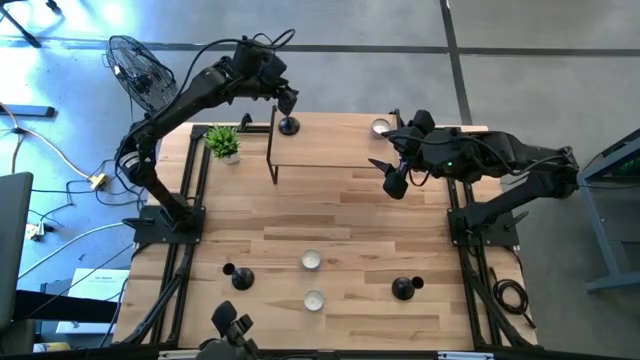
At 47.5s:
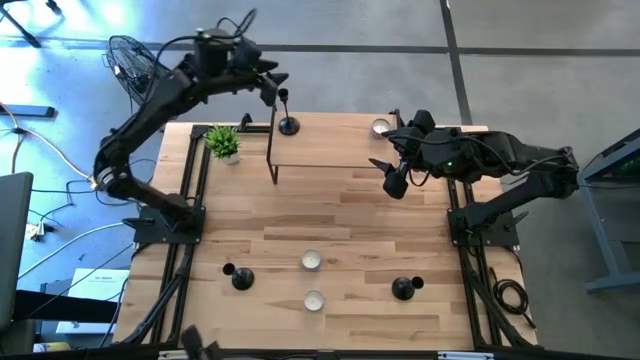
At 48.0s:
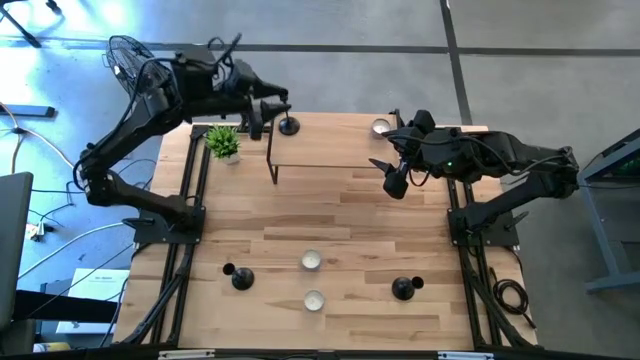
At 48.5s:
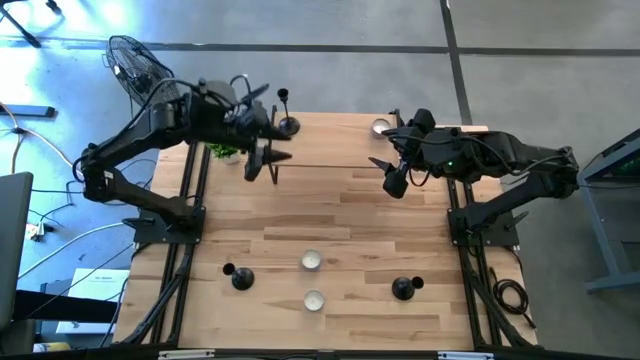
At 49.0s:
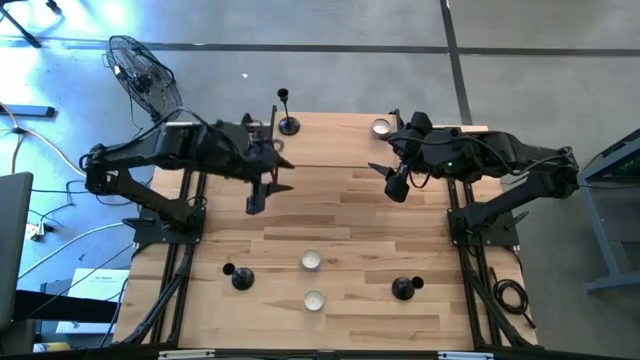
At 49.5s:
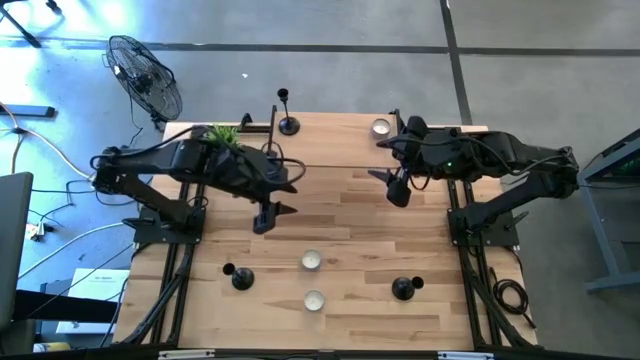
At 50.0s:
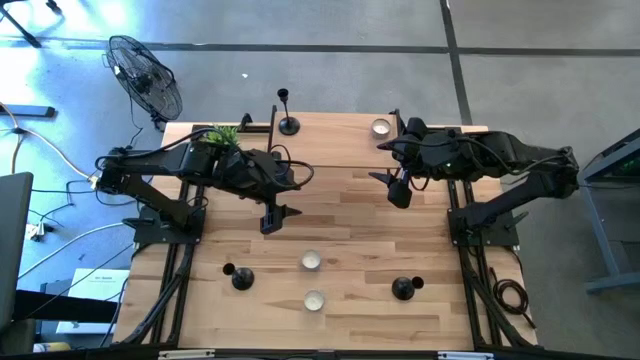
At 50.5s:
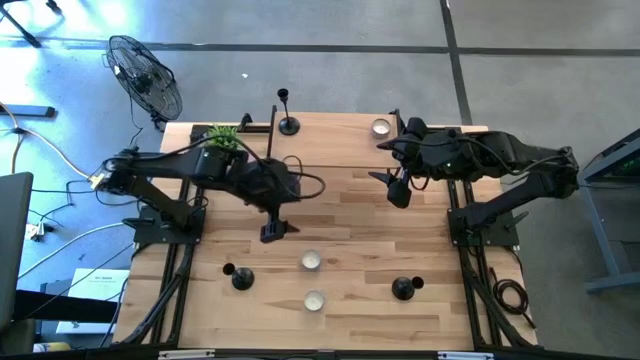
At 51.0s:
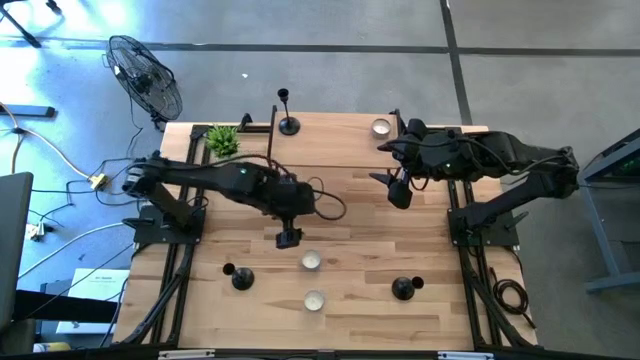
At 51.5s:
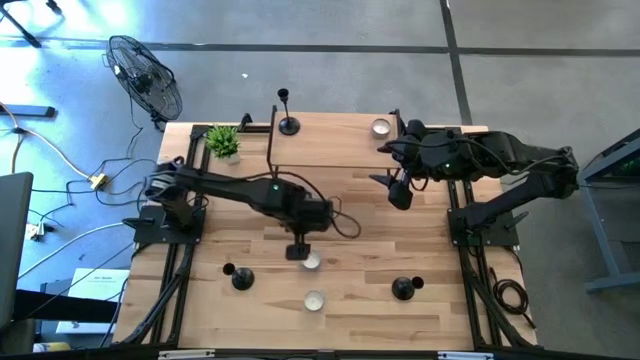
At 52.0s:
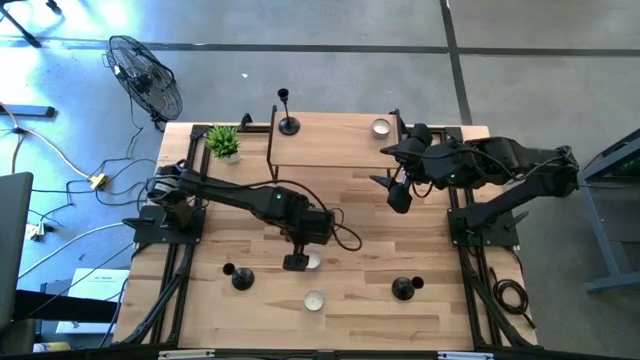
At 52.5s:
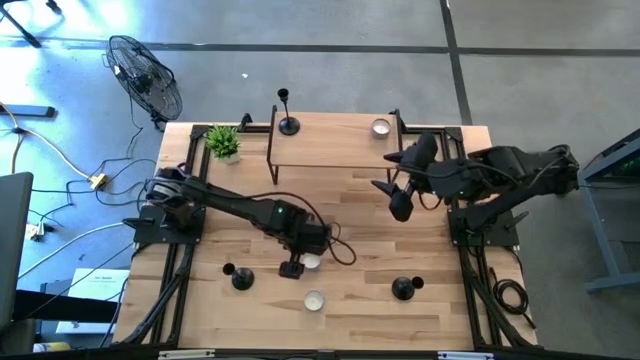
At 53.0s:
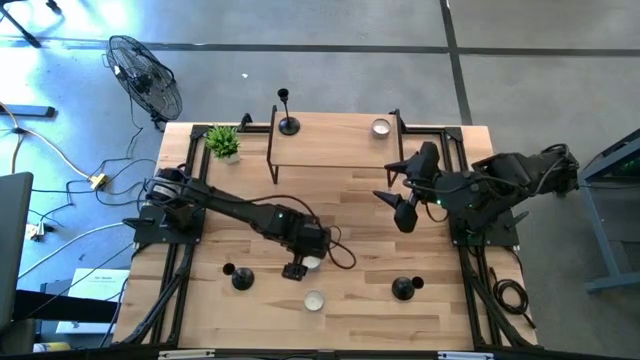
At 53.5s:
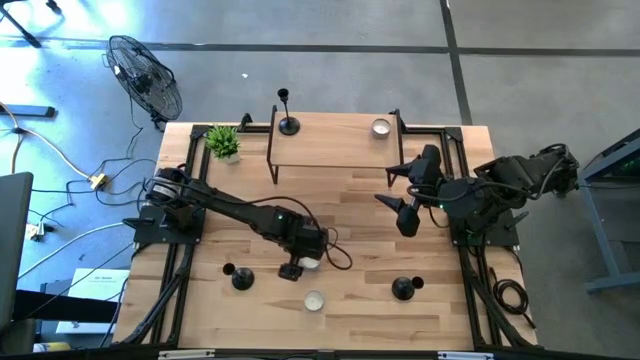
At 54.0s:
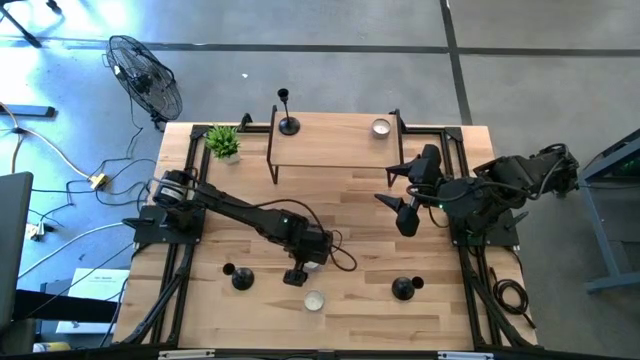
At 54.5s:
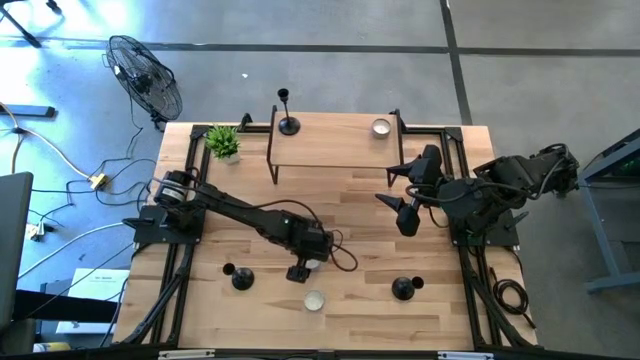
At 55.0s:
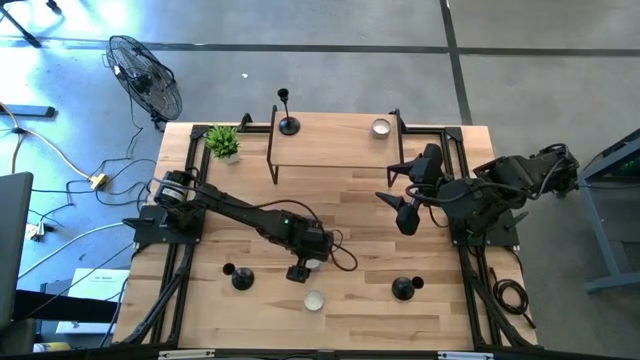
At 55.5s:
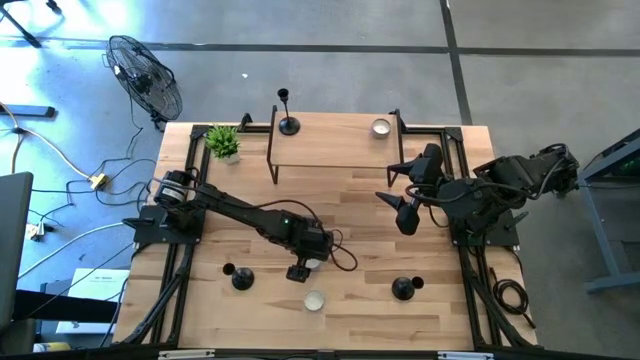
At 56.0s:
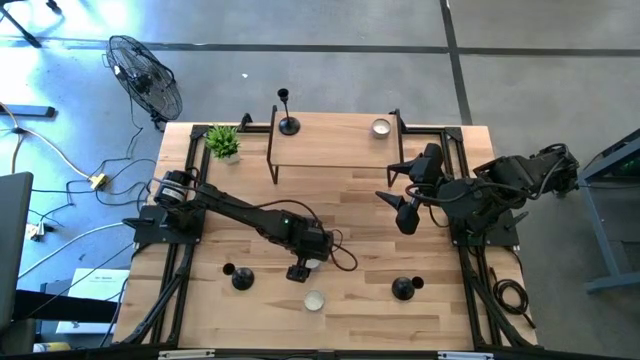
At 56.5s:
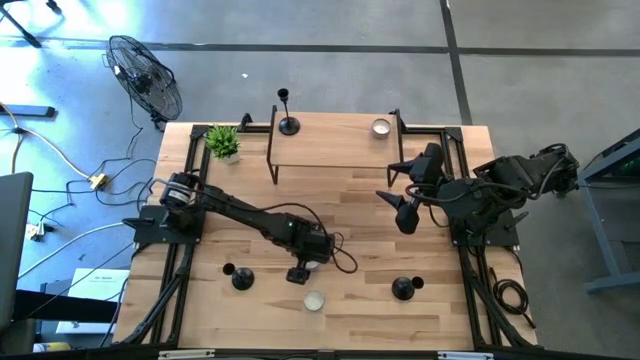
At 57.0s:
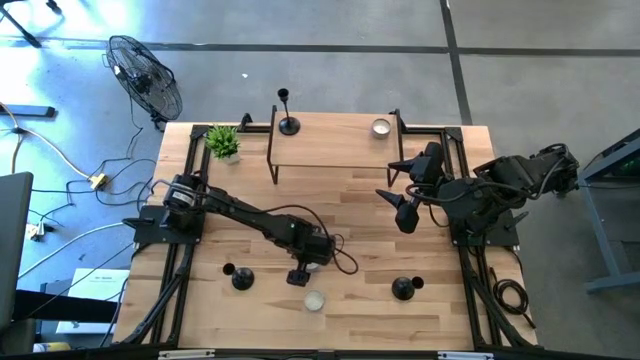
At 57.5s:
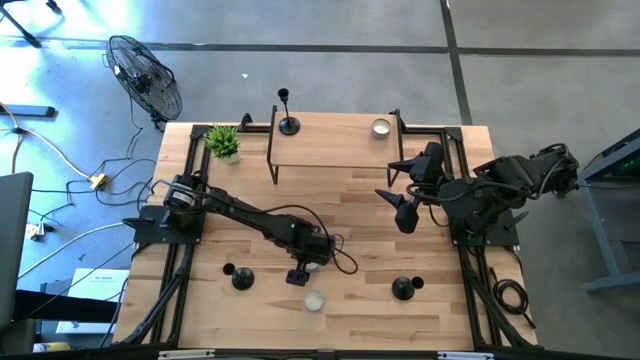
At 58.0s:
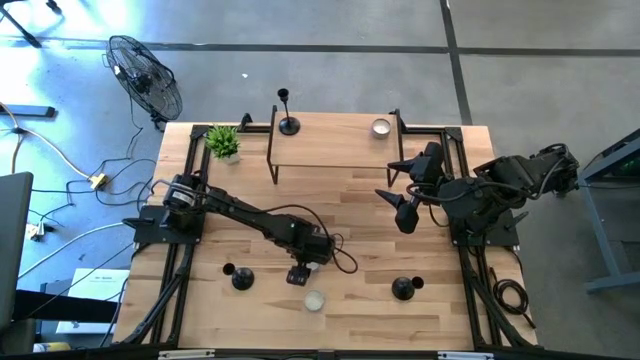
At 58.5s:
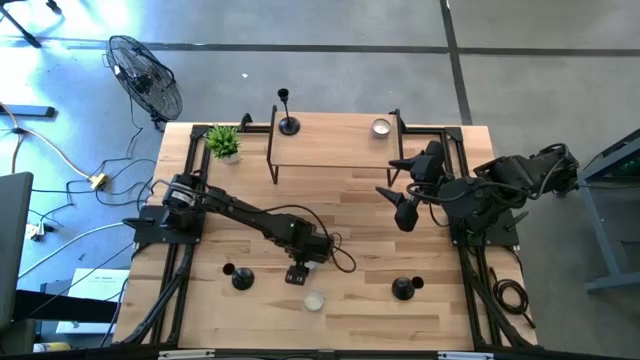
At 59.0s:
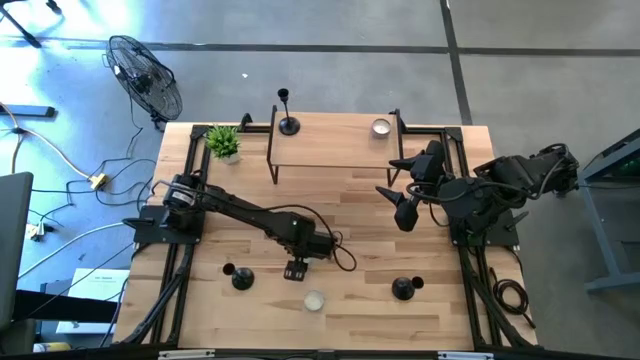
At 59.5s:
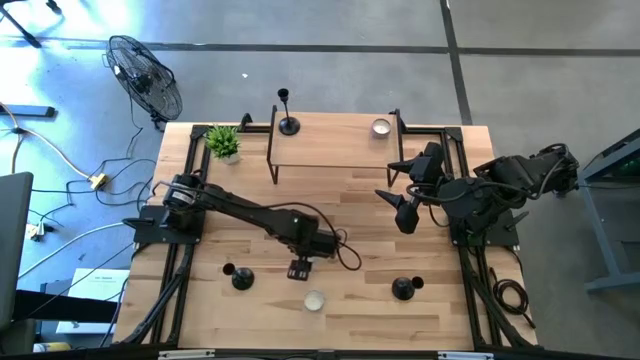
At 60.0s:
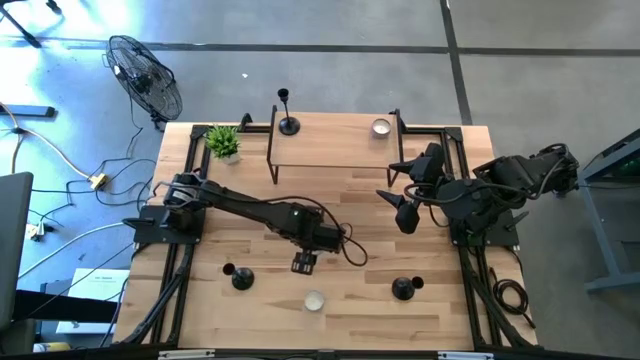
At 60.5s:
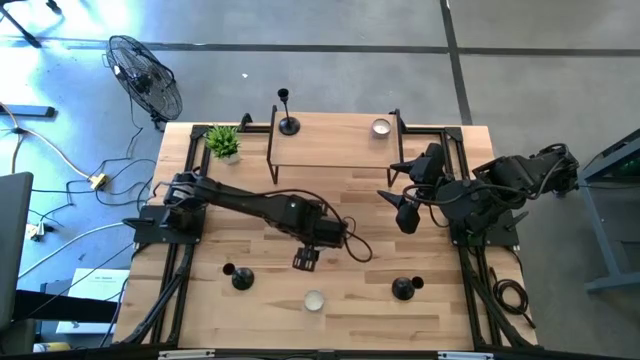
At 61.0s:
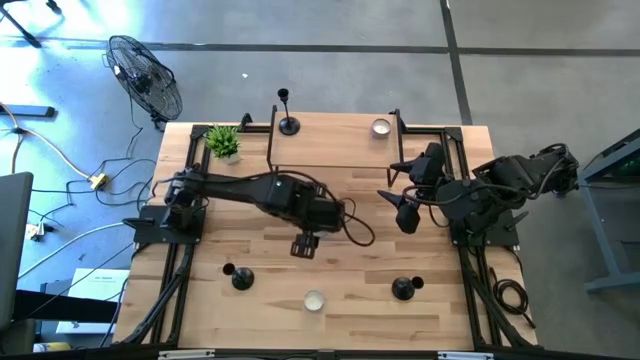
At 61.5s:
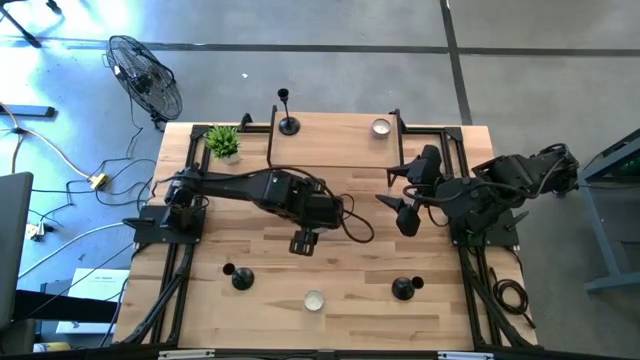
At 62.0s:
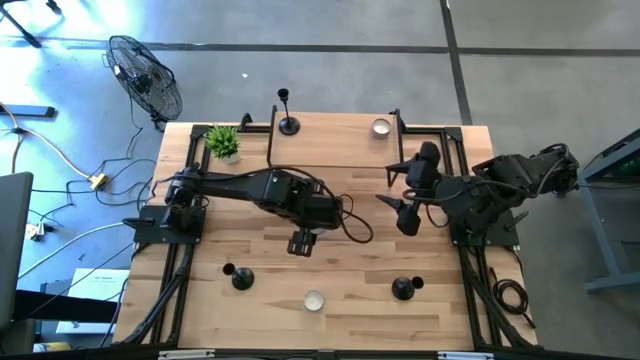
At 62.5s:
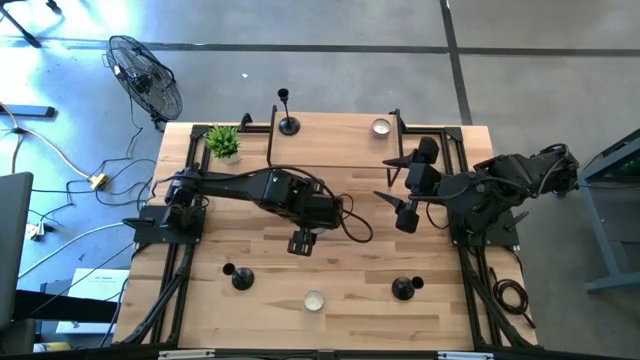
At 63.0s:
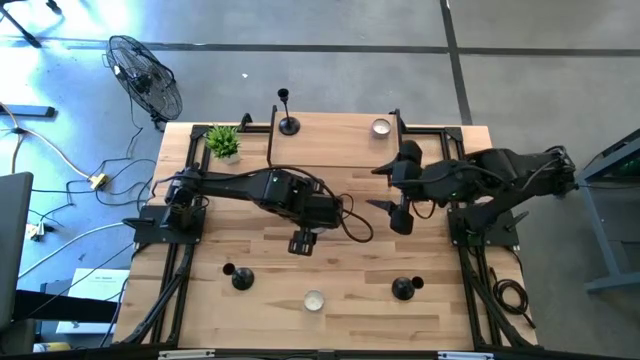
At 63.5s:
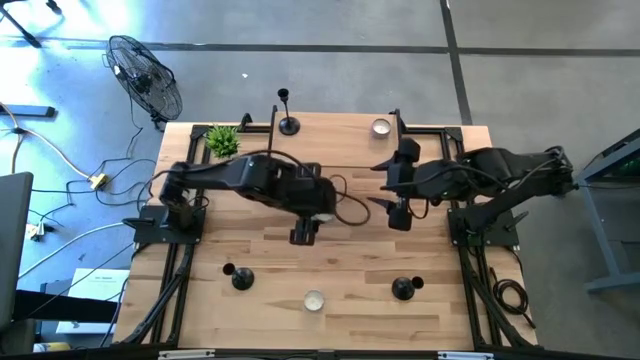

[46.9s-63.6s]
Task: Pick & Place candle stick holders
Put the blue patterned scented candle on the shelf

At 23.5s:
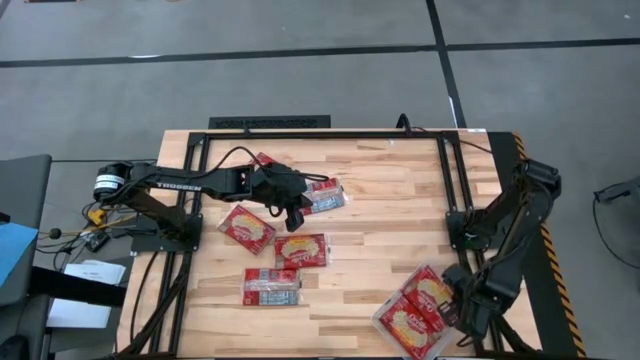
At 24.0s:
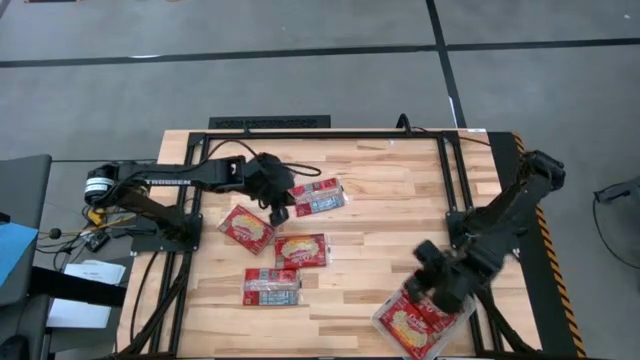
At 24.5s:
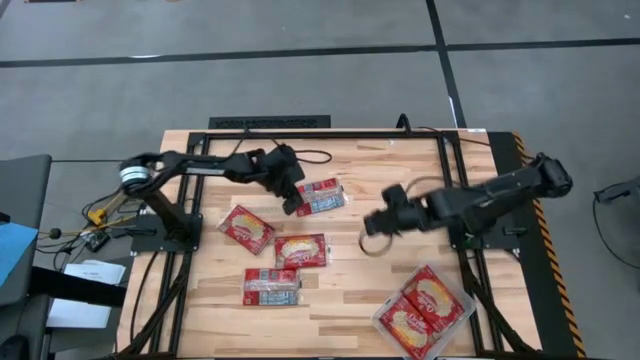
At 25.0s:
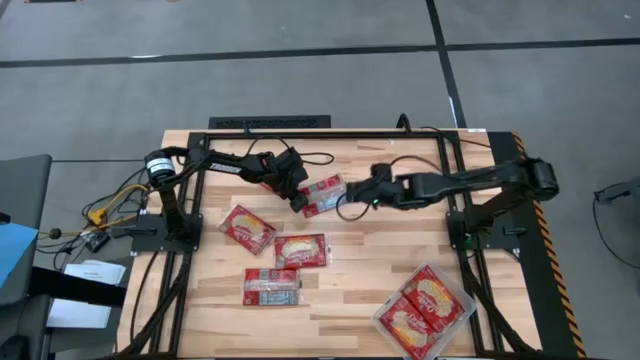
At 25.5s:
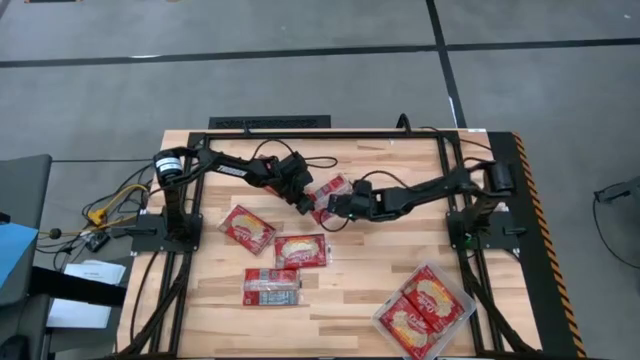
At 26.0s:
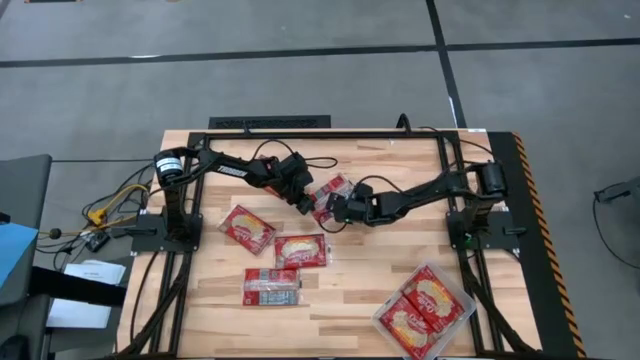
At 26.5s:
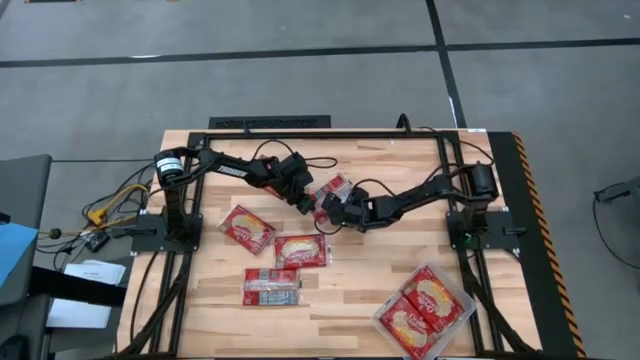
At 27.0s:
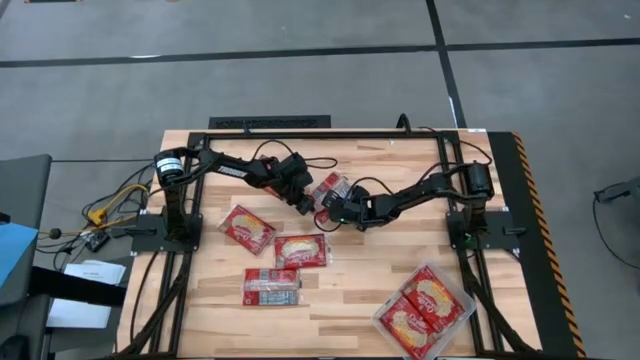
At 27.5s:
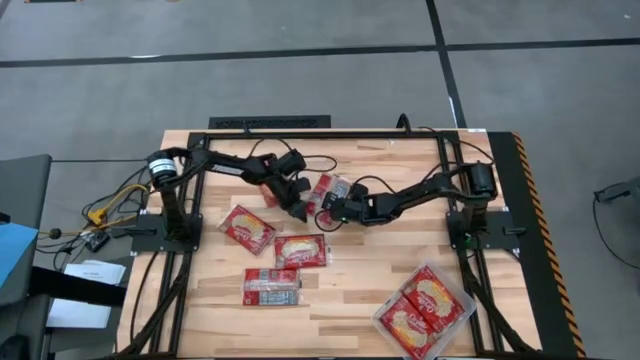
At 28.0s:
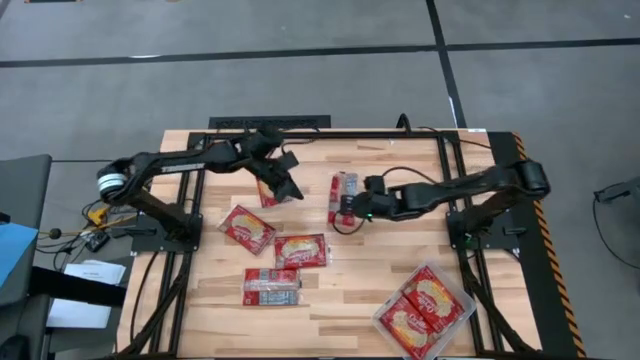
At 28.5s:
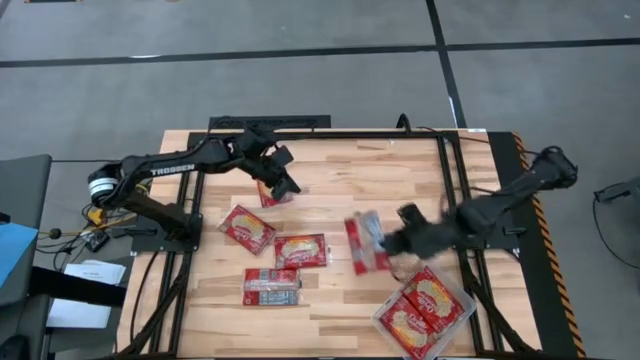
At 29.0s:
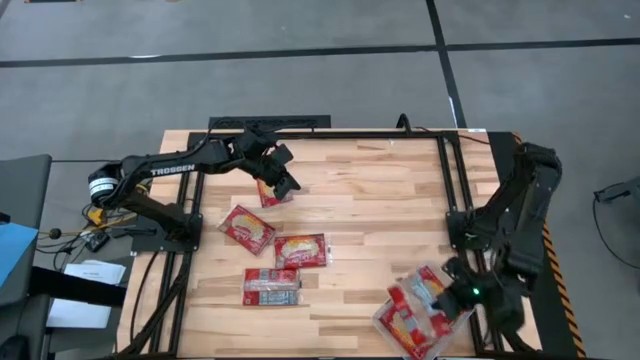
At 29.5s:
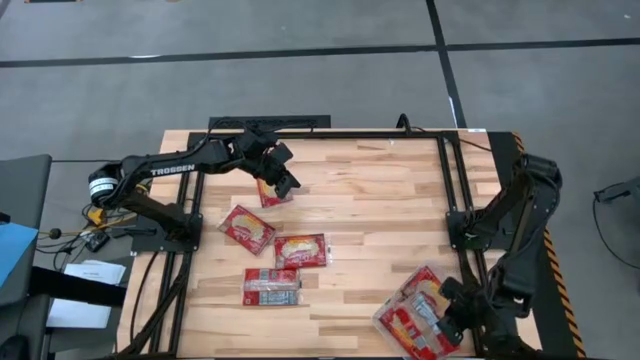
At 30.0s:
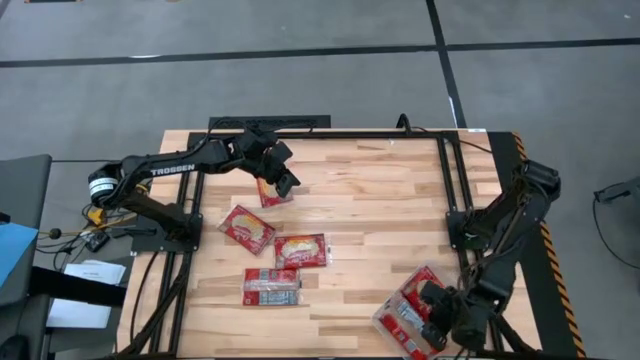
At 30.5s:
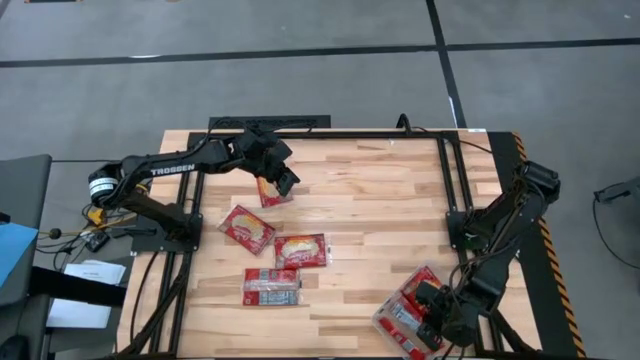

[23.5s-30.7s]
Task: Sort popcorn bags into baskets
Put the red popcorn bag into the transparent bin
